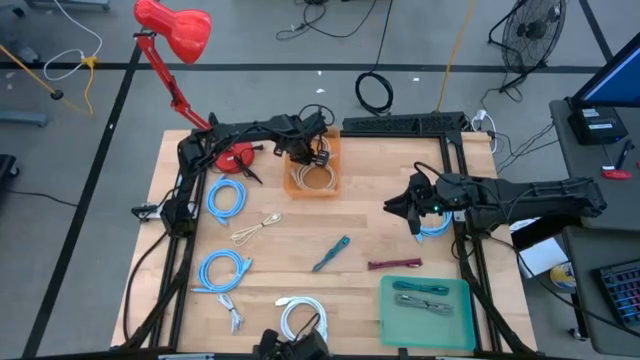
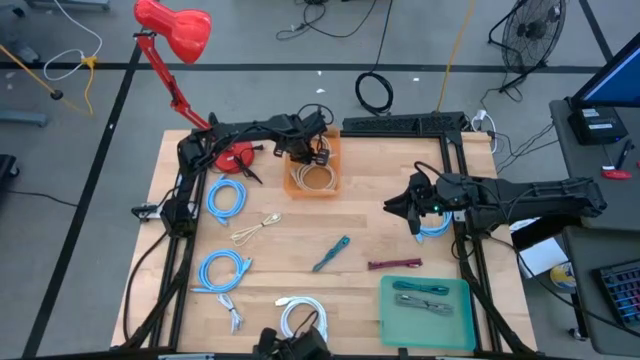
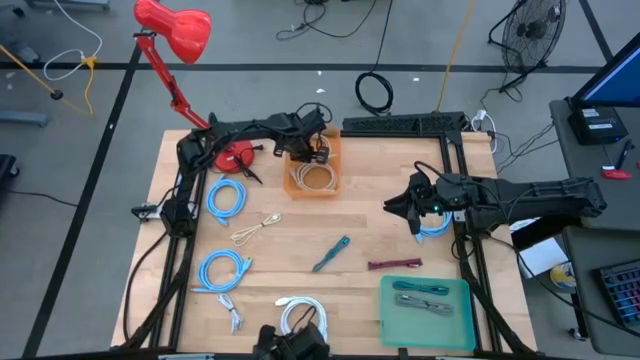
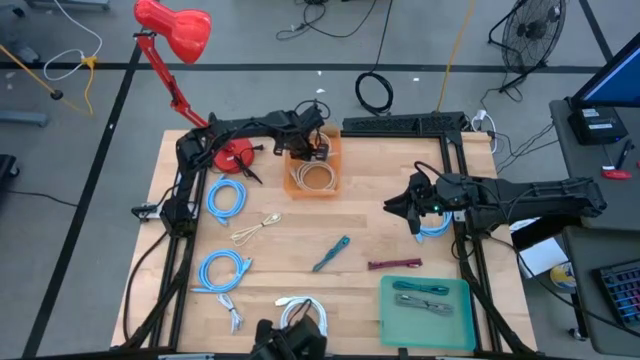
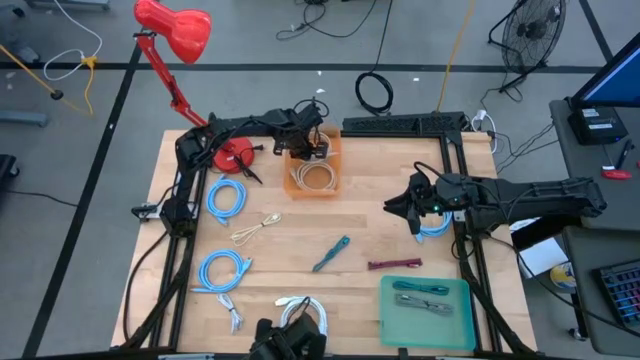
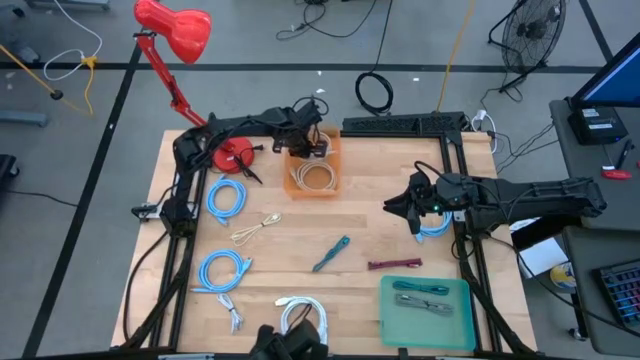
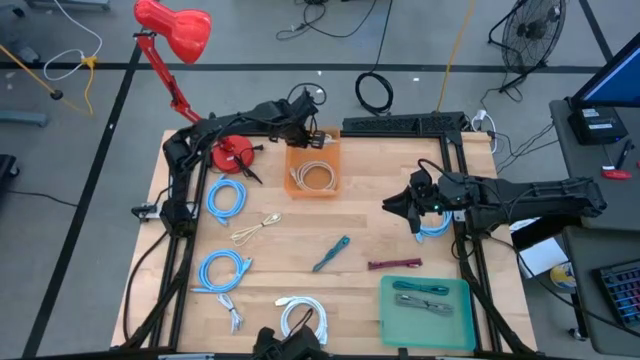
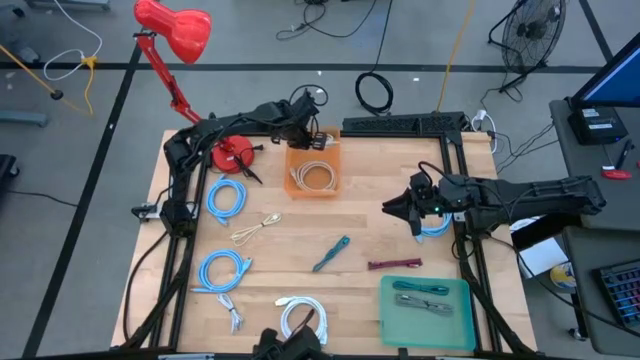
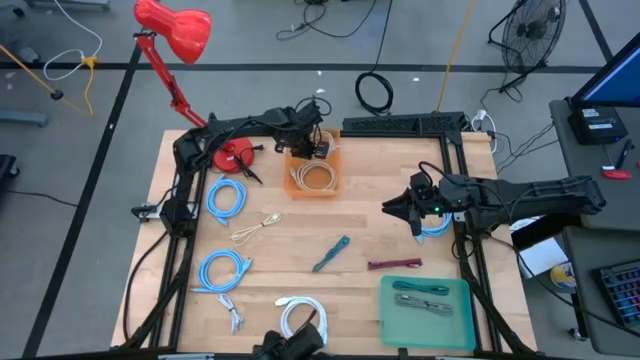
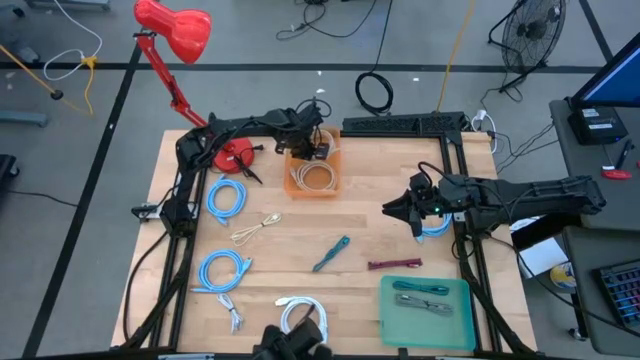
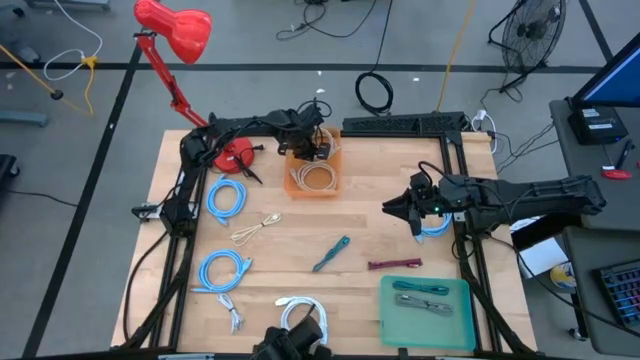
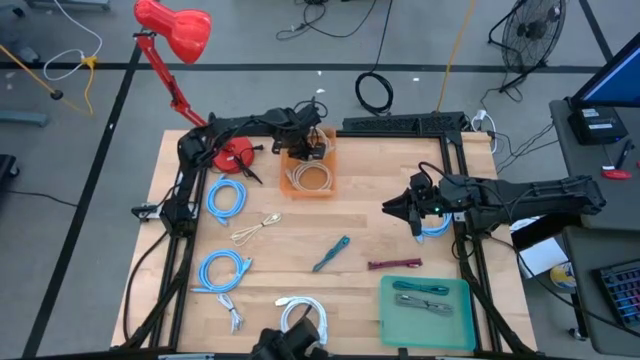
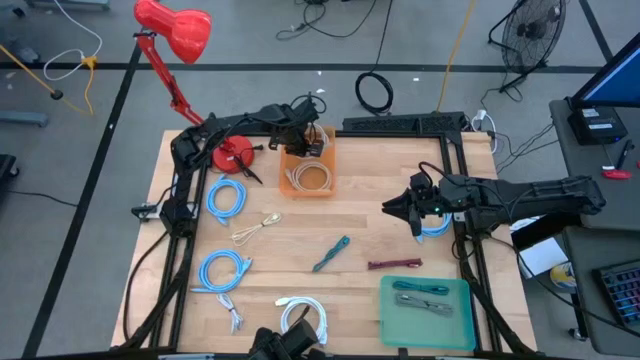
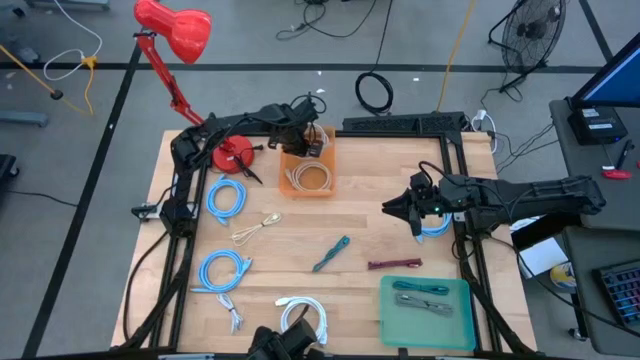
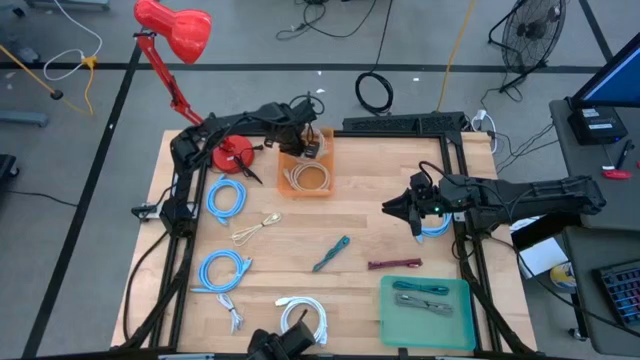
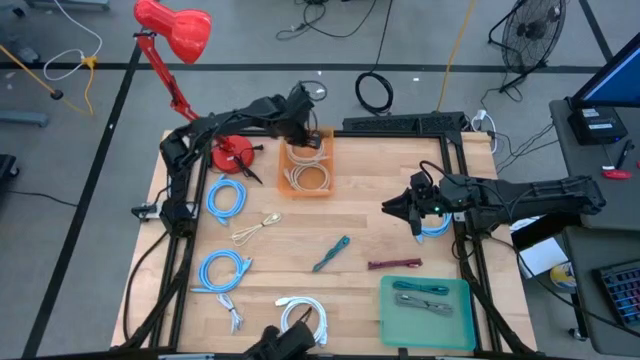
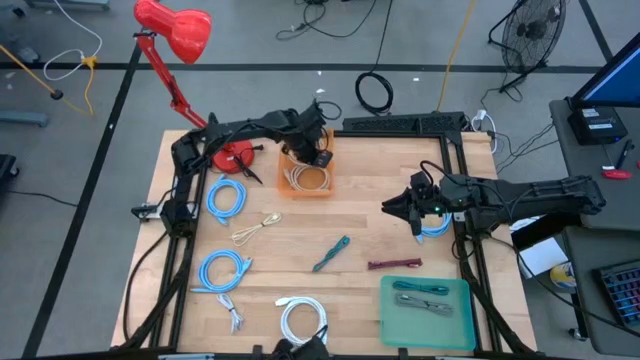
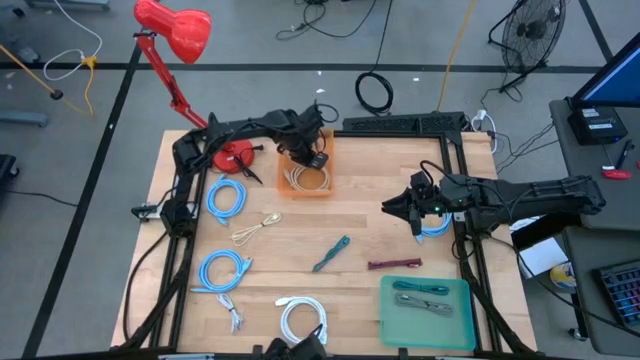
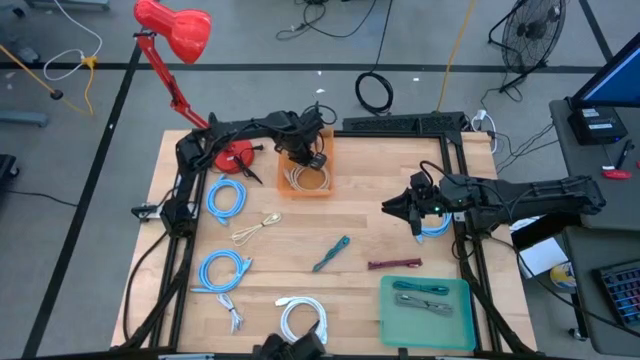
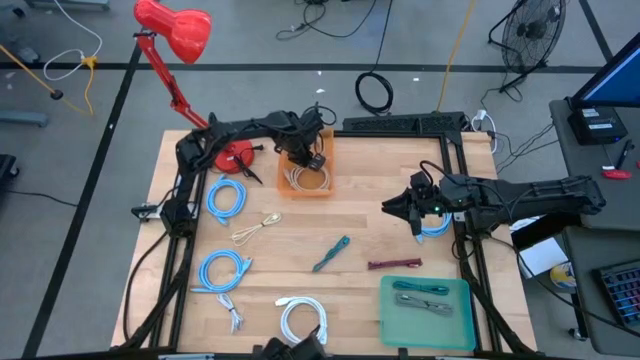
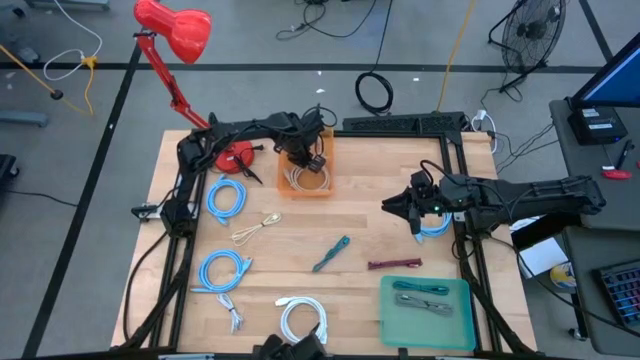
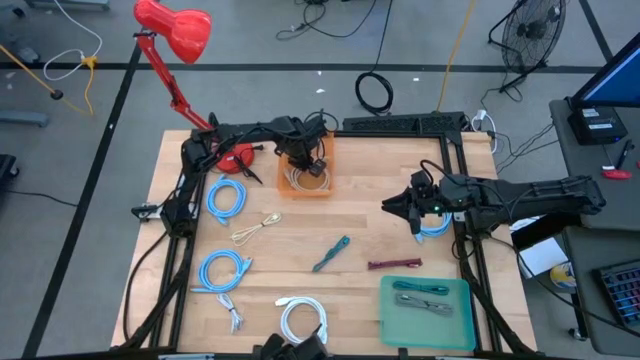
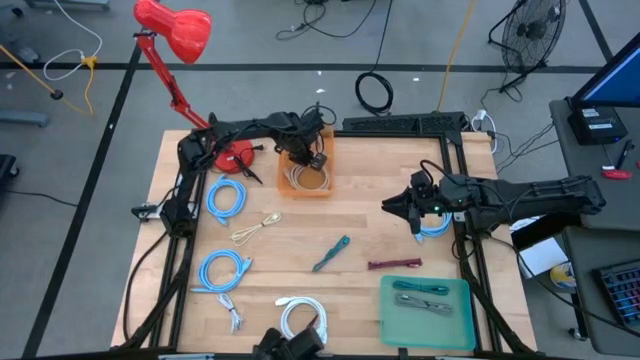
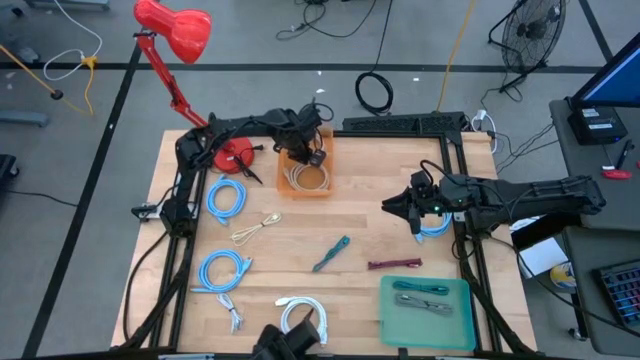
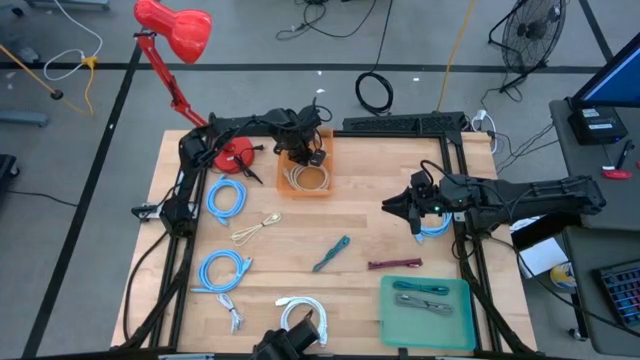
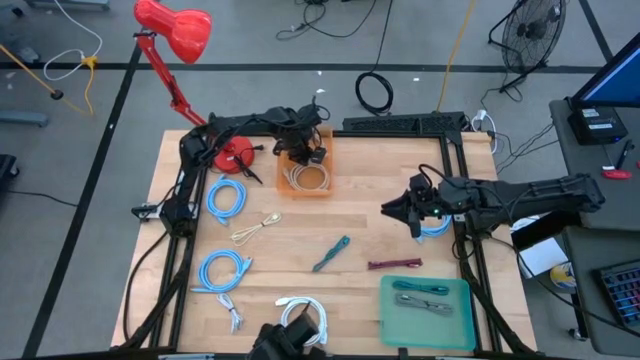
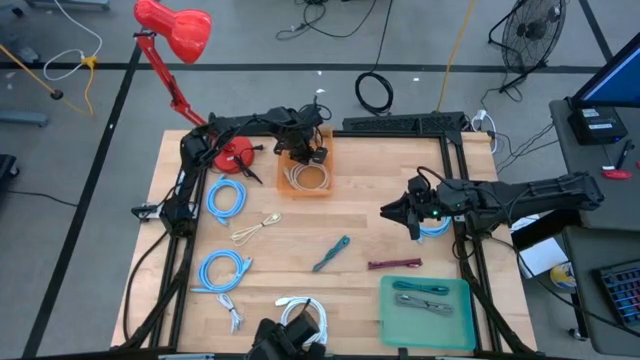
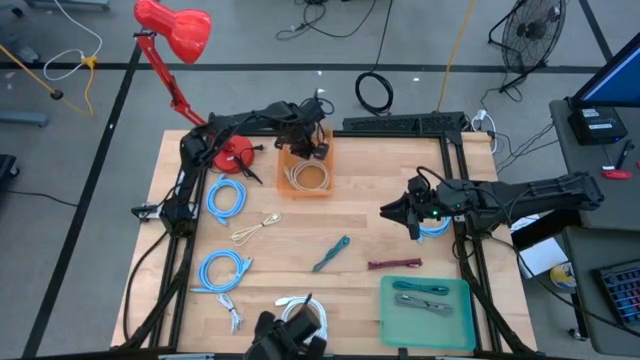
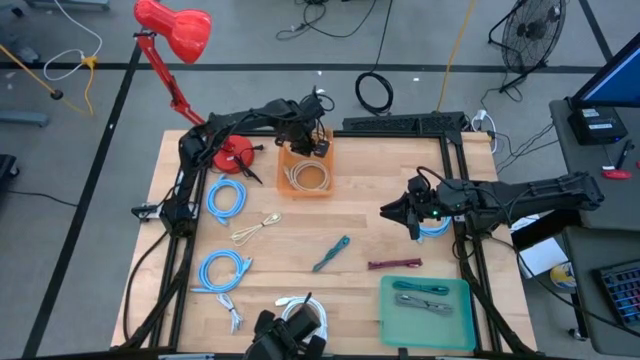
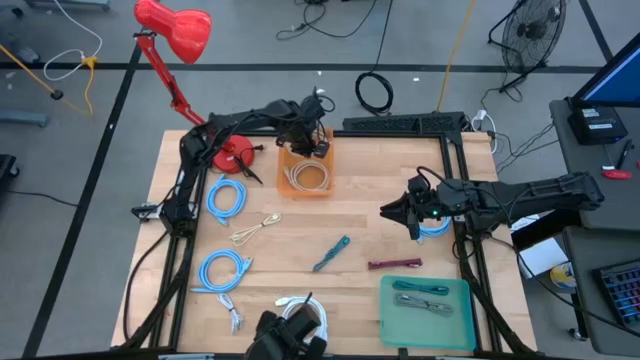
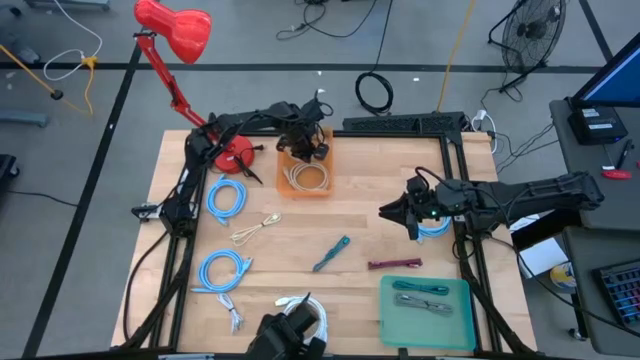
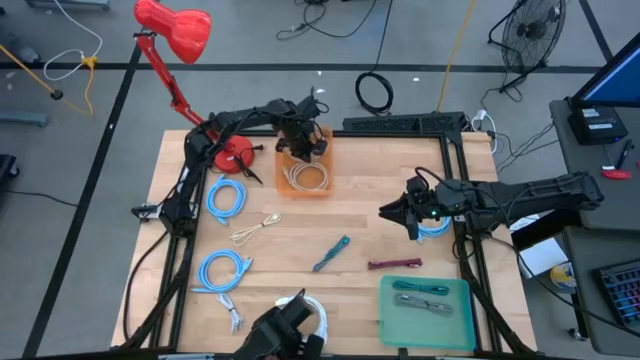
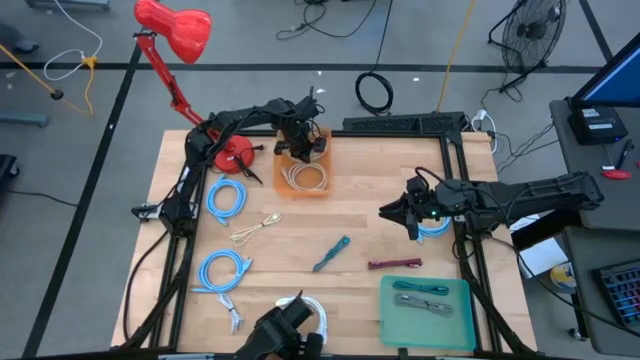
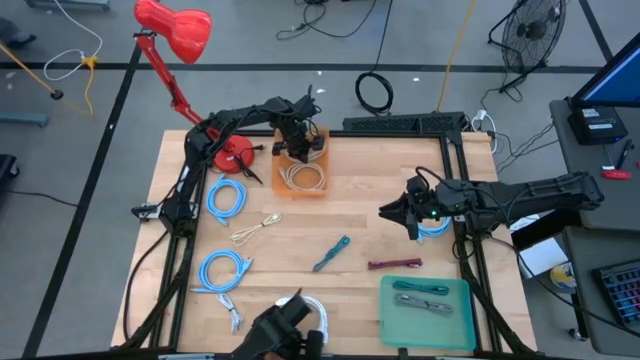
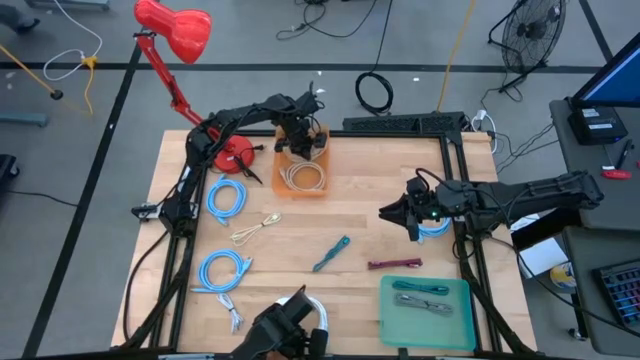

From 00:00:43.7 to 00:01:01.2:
Task: Pick & Place USB Port
Put the light brown wire cable into the orange bin

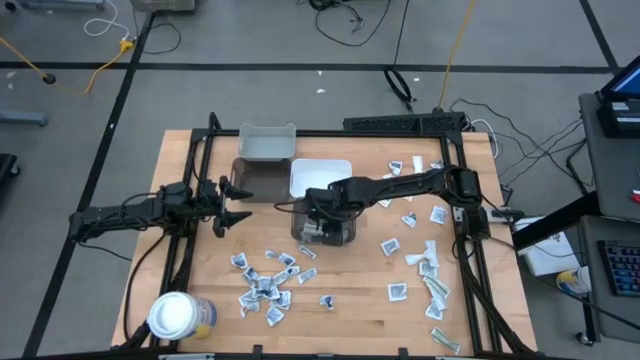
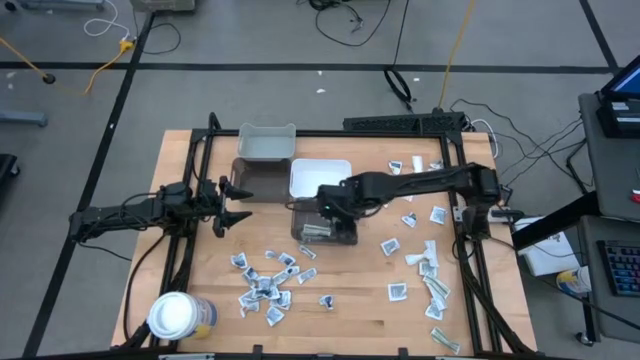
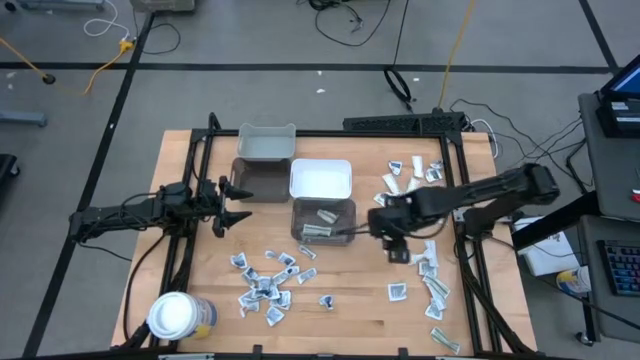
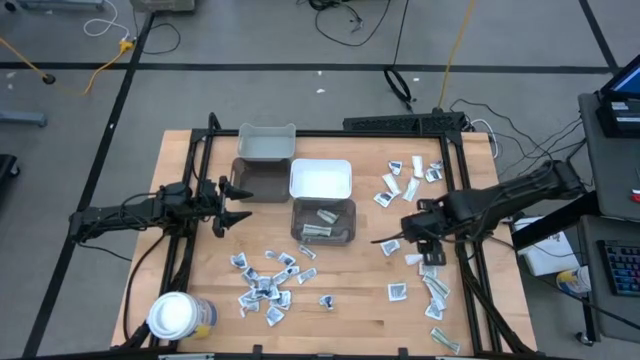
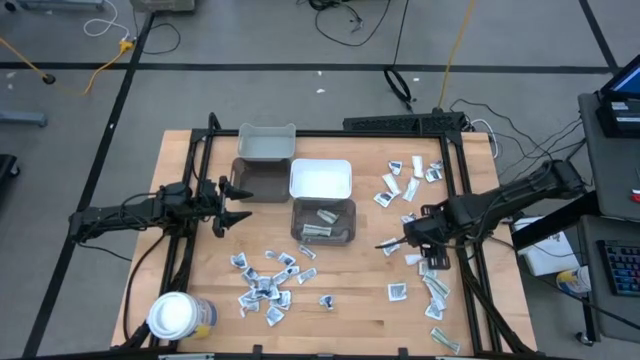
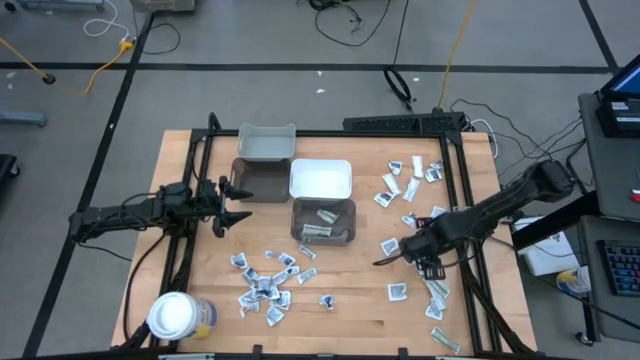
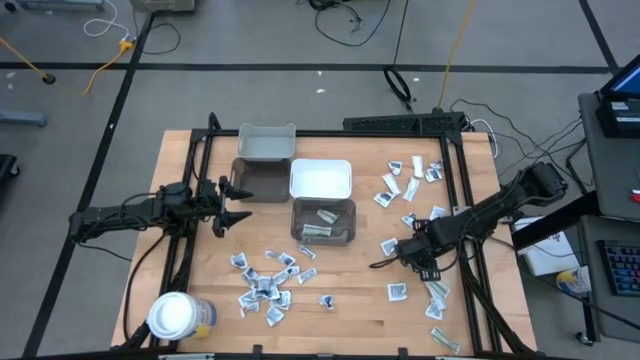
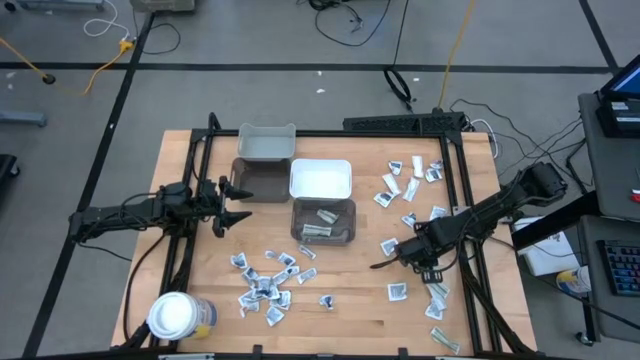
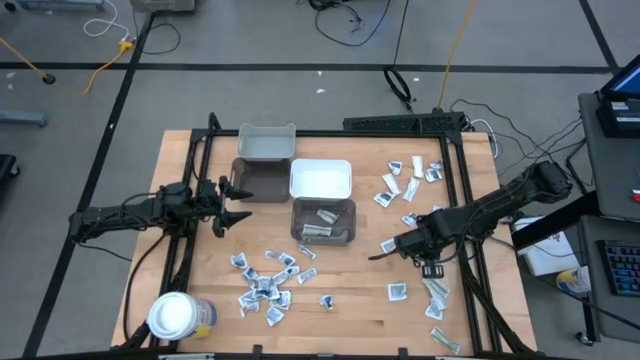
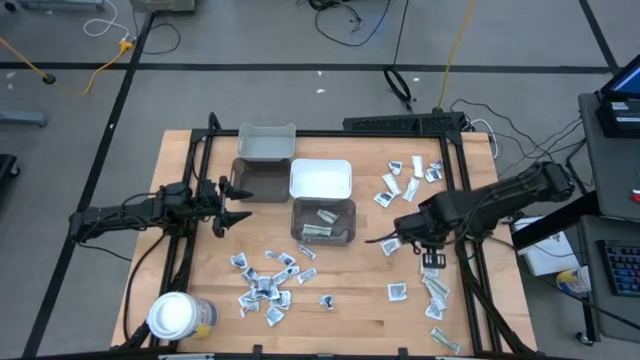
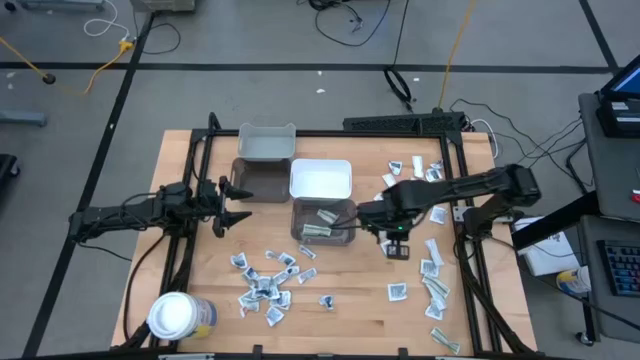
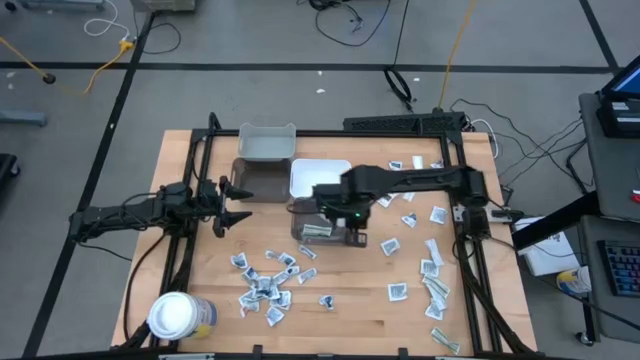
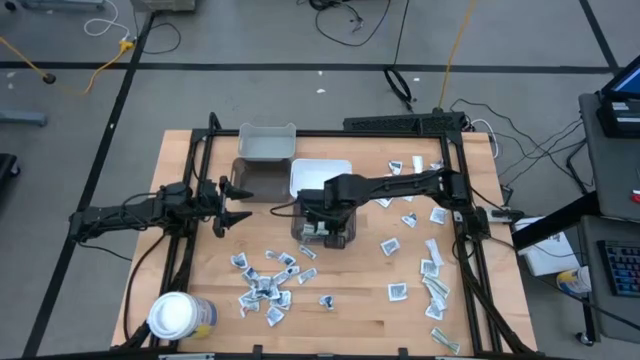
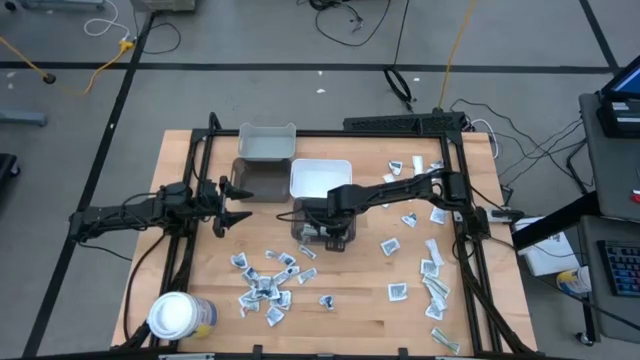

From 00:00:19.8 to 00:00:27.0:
Task: Pick & Place First Aid Supplies
Put the green bandage pack into the right black bin
